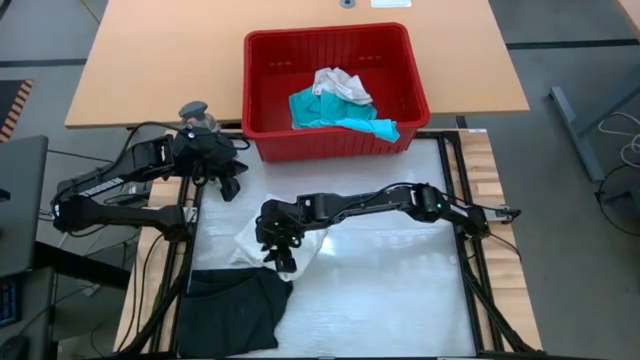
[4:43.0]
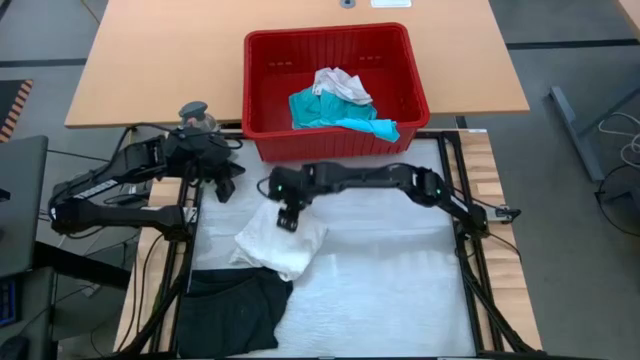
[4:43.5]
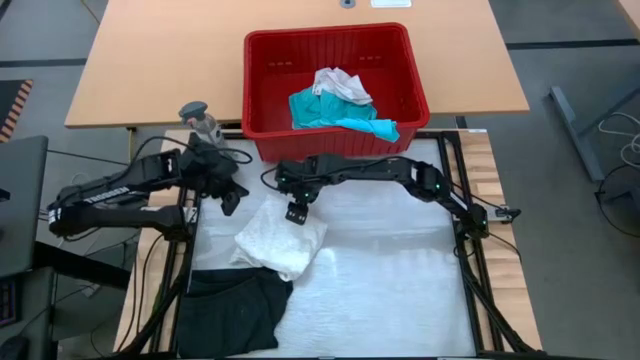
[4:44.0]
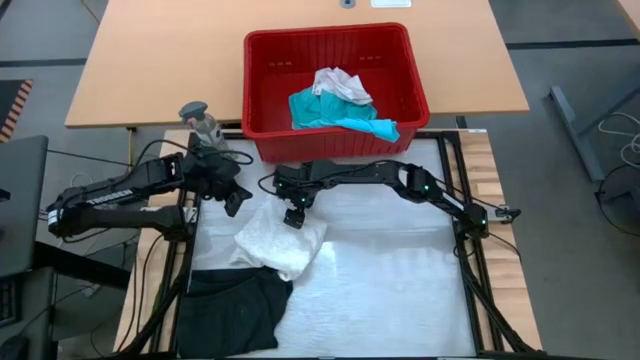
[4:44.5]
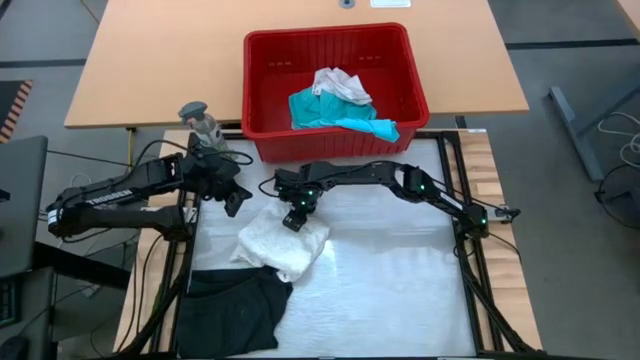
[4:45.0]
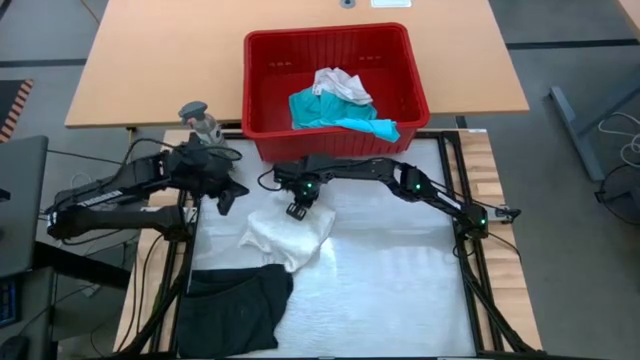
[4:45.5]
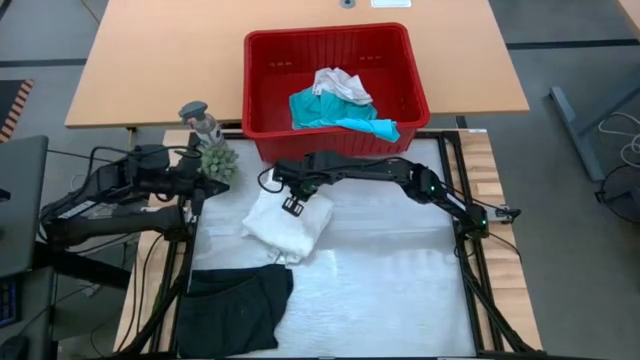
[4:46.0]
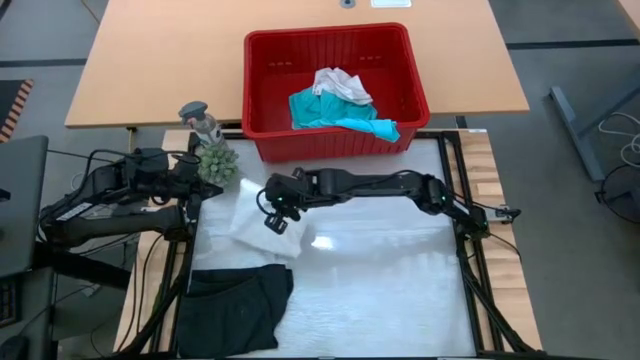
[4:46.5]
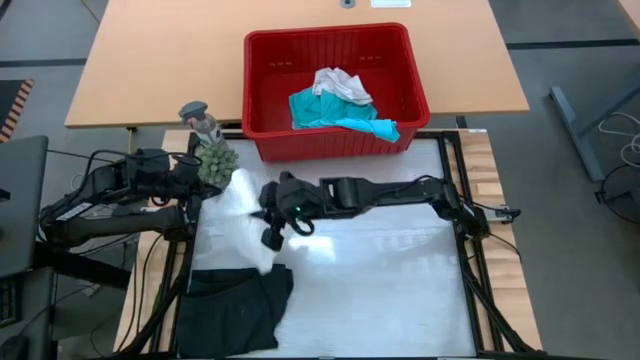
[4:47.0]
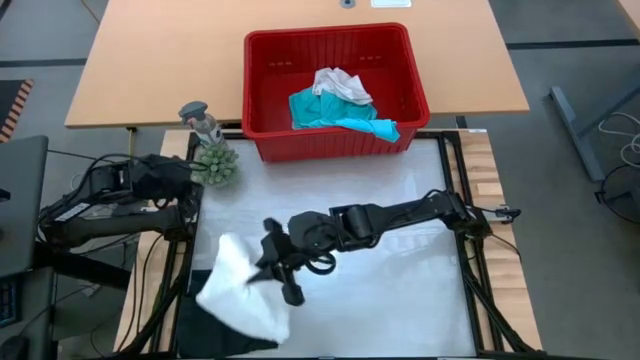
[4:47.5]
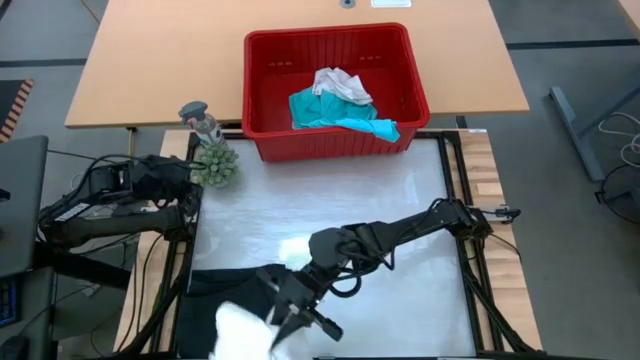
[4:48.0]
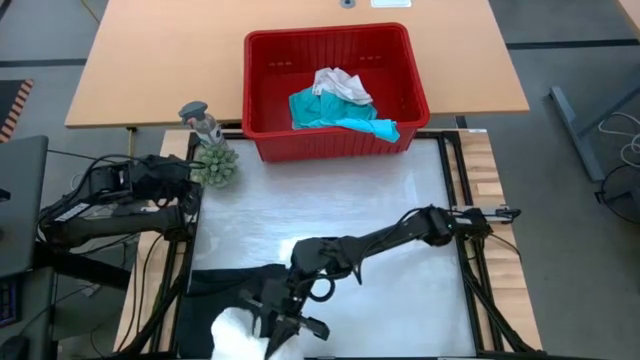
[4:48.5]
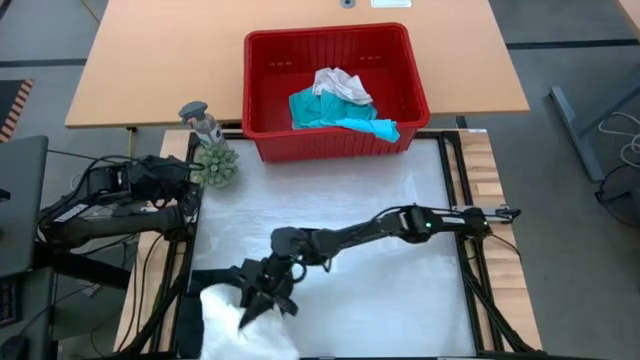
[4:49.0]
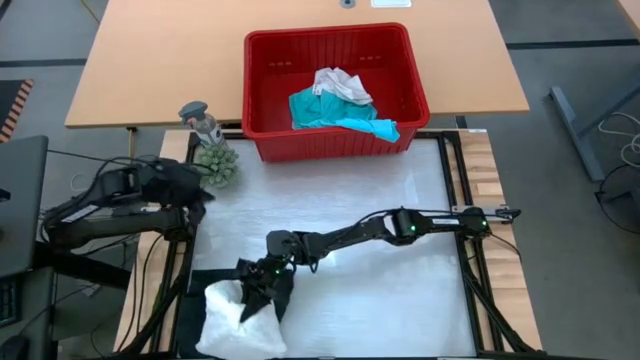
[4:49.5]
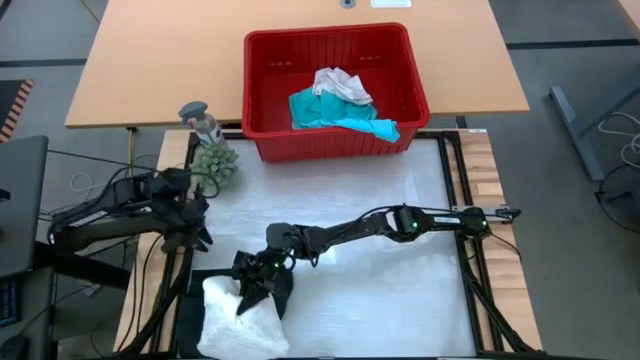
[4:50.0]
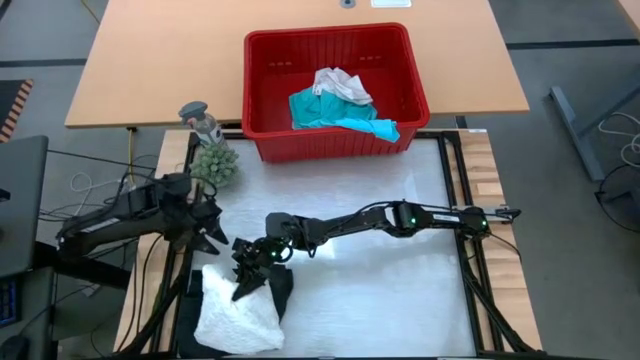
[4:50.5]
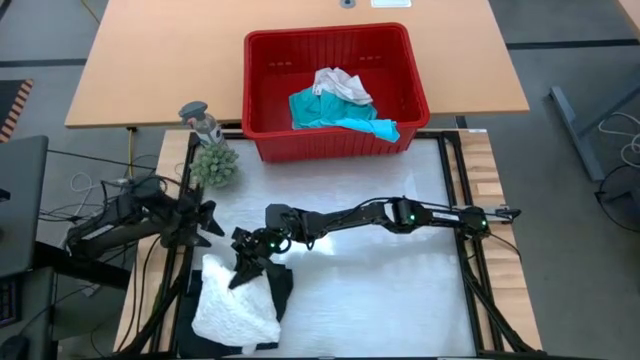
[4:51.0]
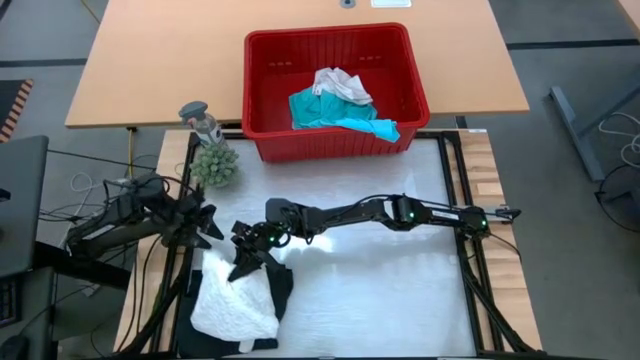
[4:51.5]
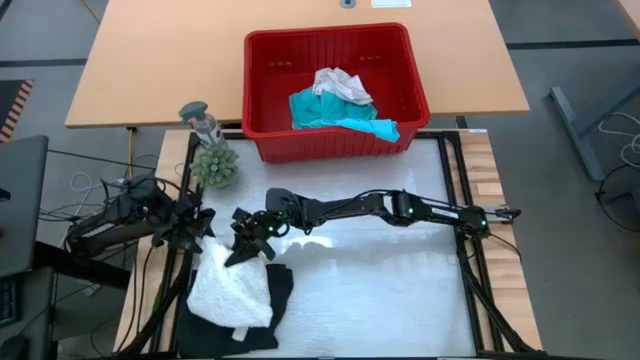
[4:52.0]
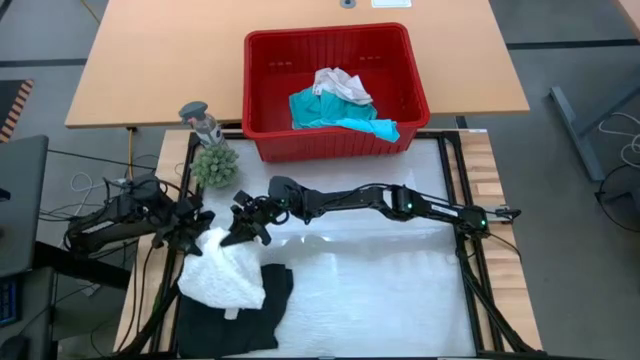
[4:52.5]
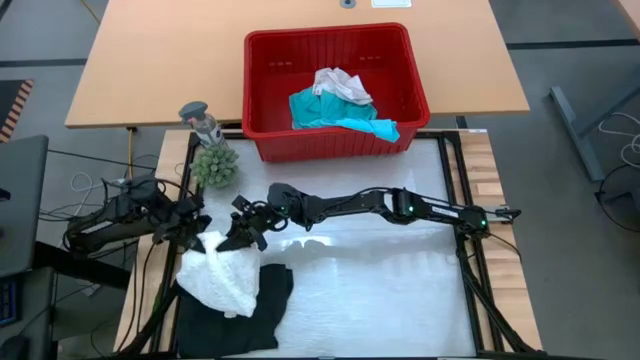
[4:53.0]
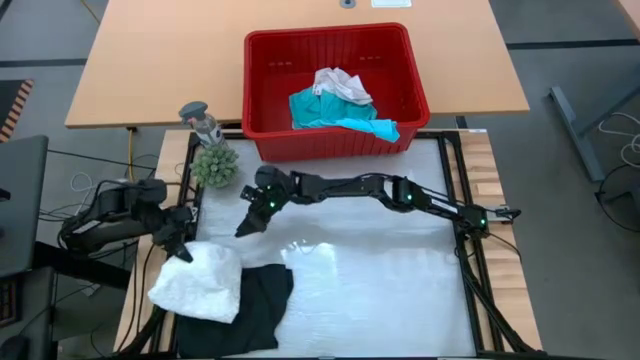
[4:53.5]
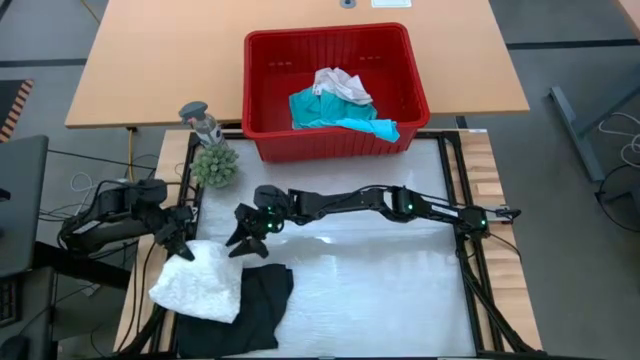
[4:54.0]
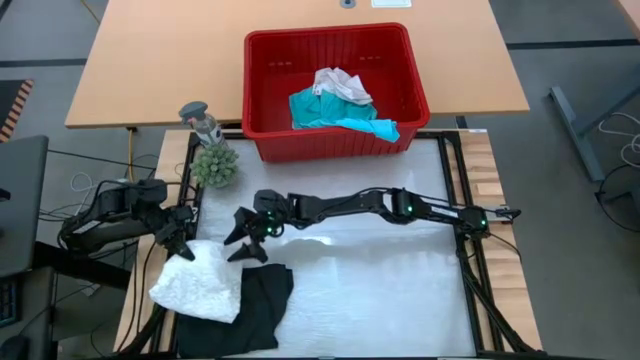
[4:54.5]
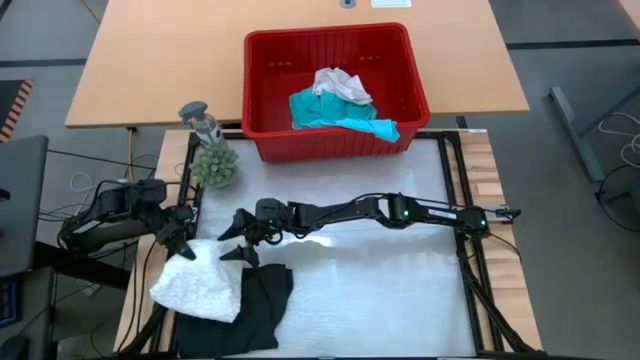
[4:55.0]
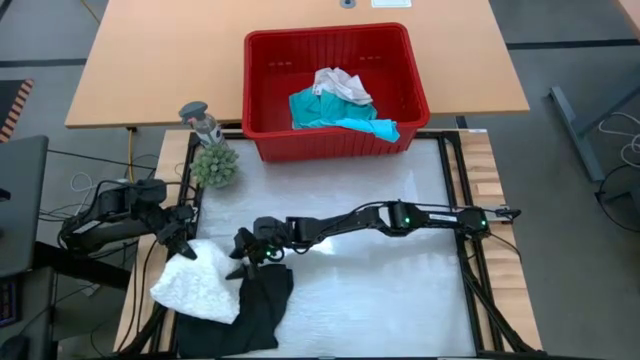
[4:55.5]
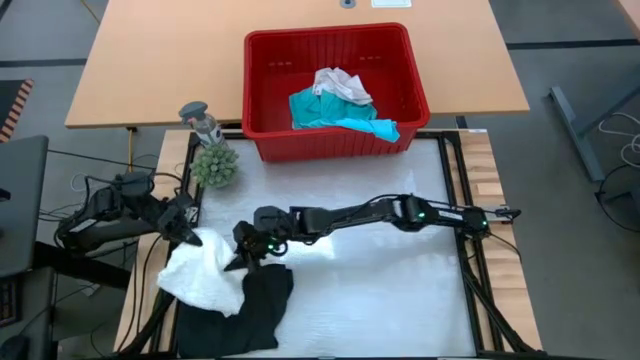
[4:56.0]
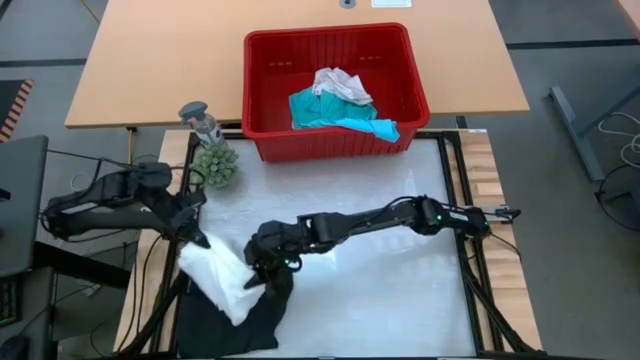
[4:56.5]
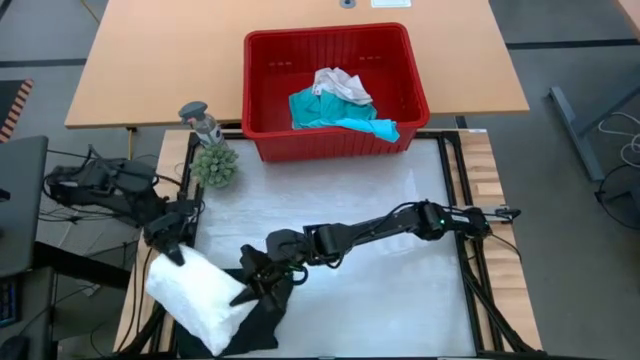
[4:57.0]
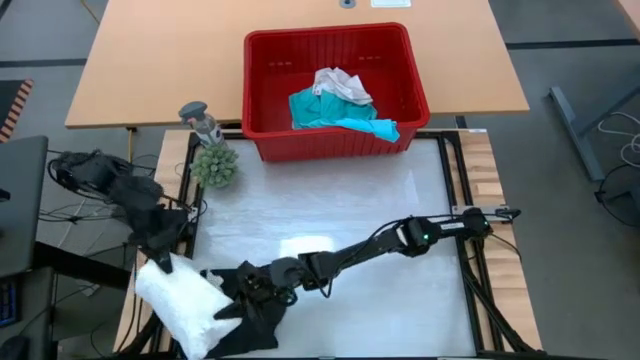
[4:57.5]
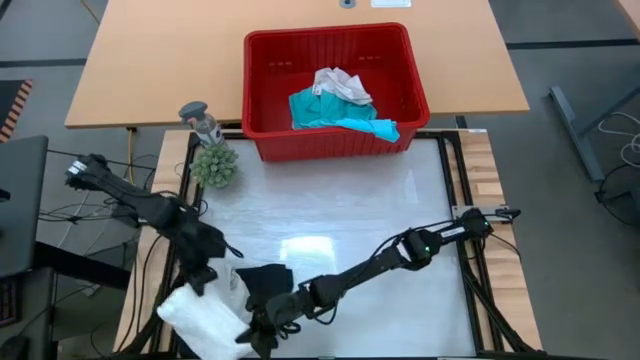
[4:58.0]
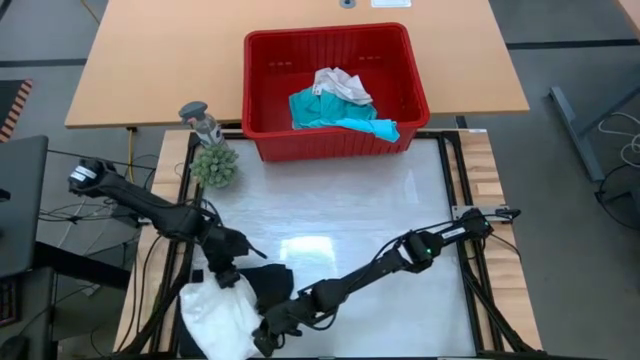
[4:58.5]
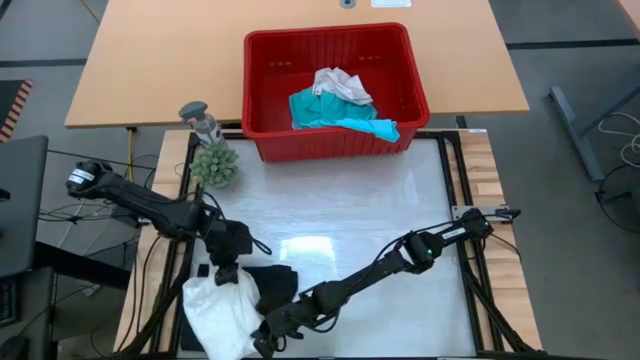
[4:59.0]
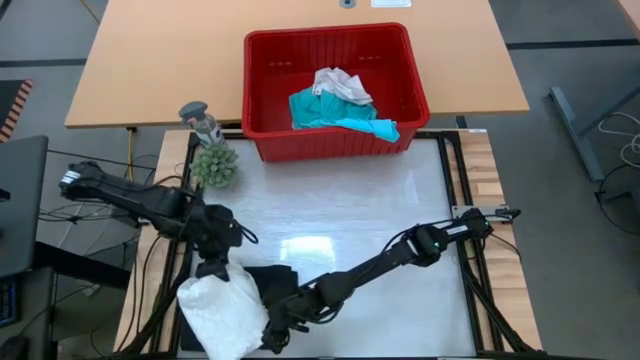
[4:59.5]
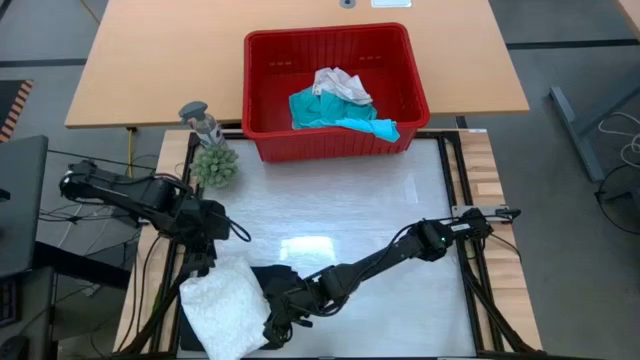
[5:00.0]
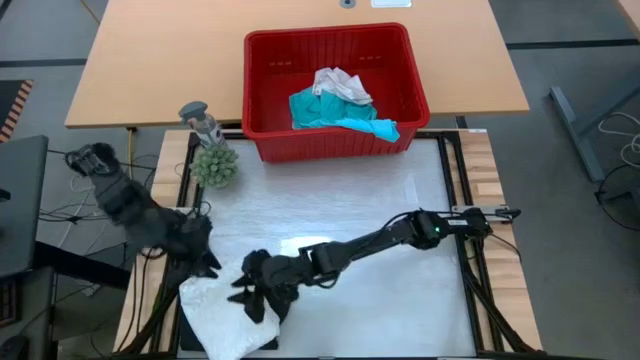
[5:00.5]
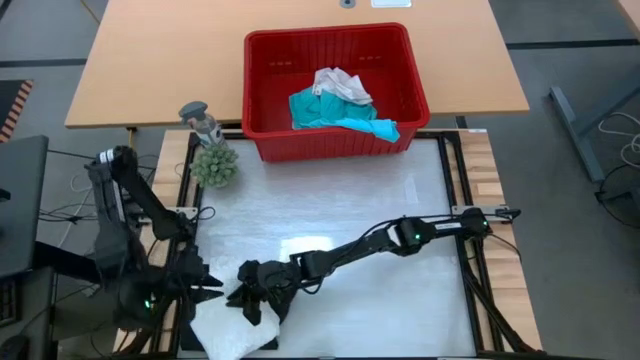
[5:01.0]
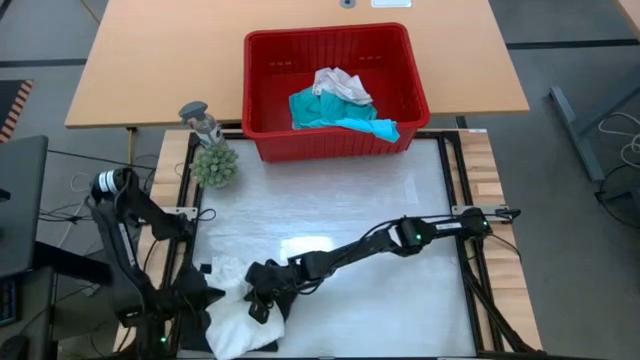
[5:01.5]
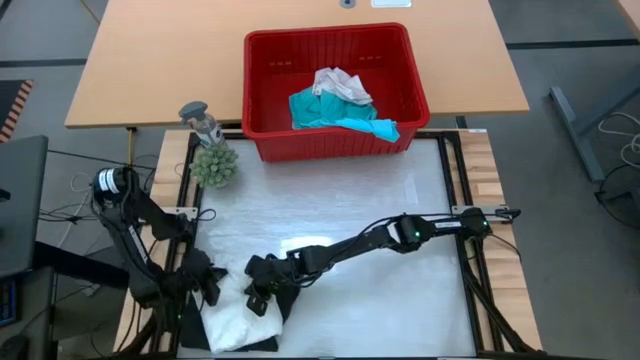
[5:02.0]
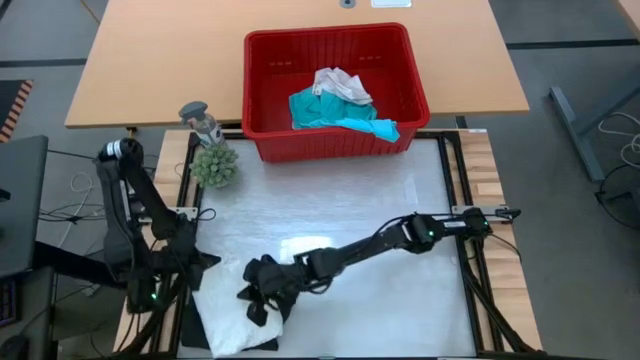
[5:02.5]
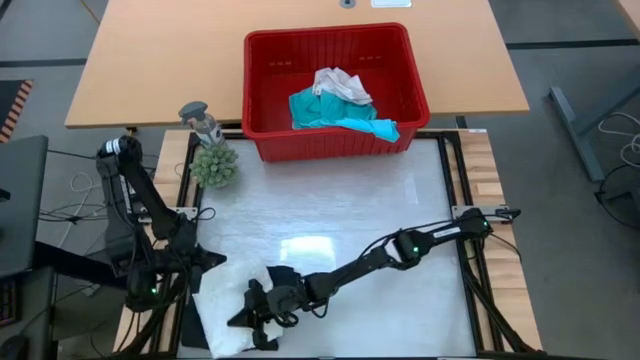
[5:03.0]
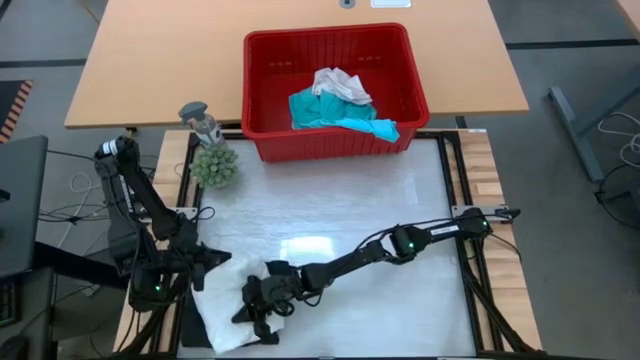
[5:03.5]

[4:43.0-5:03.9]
Task: Fold Laundry from Bin
Stack the white dress on top of the black shorts
